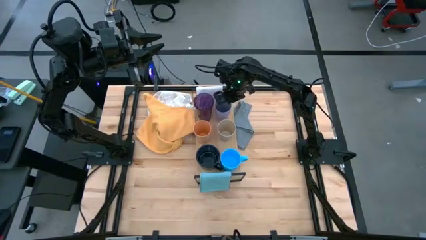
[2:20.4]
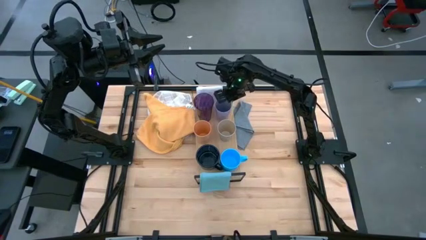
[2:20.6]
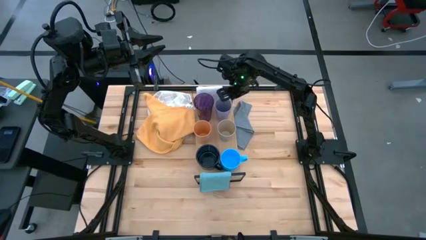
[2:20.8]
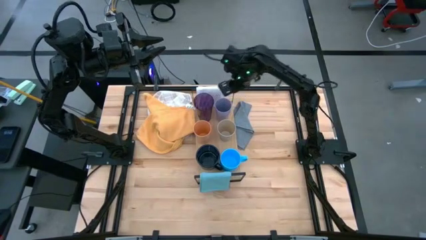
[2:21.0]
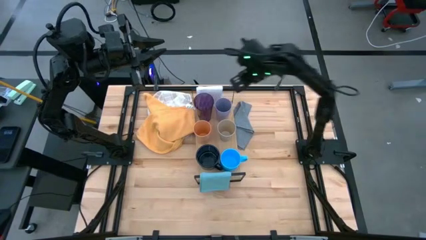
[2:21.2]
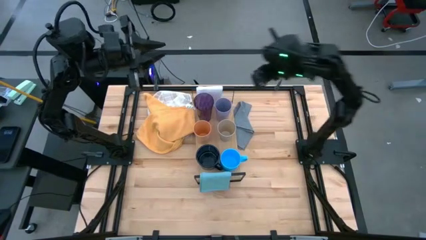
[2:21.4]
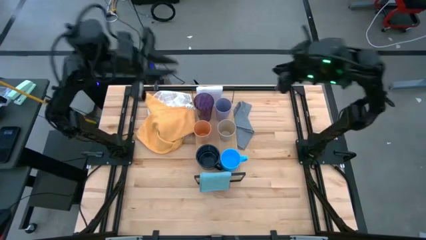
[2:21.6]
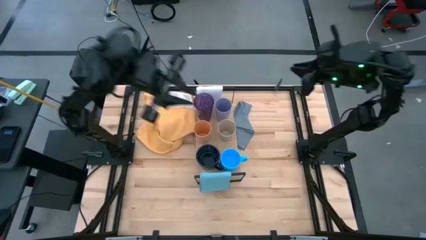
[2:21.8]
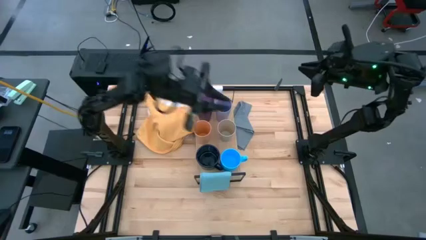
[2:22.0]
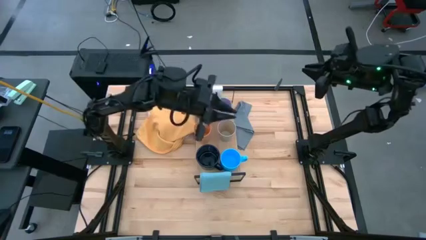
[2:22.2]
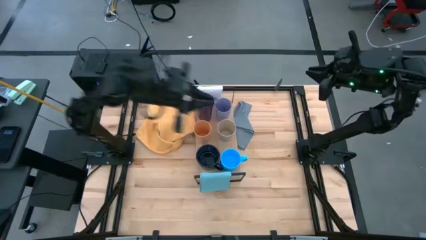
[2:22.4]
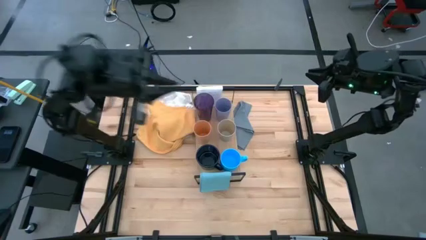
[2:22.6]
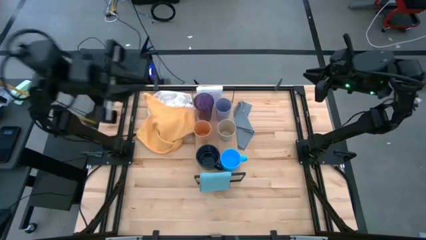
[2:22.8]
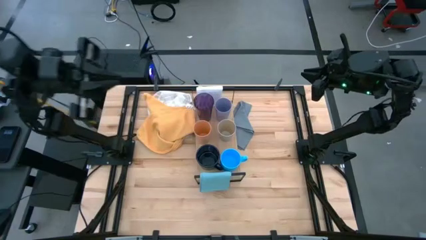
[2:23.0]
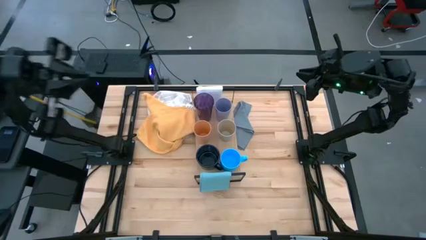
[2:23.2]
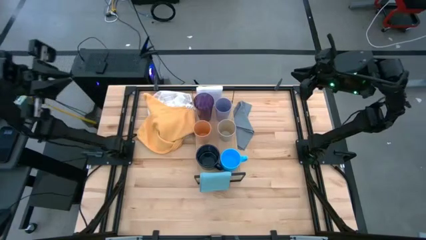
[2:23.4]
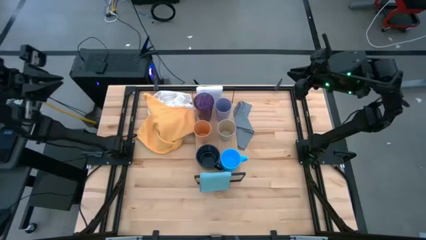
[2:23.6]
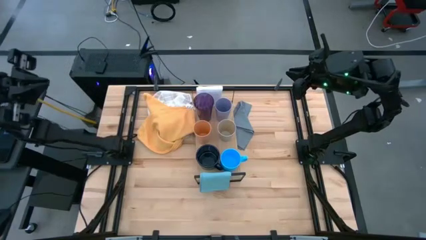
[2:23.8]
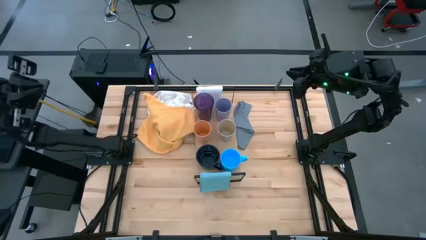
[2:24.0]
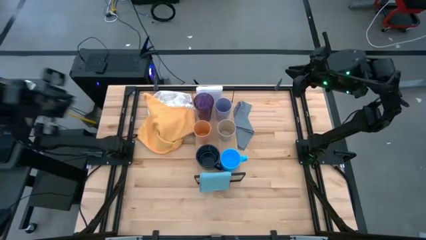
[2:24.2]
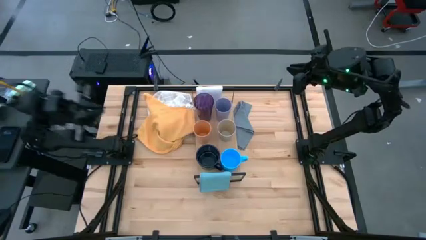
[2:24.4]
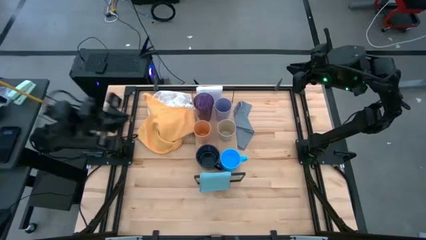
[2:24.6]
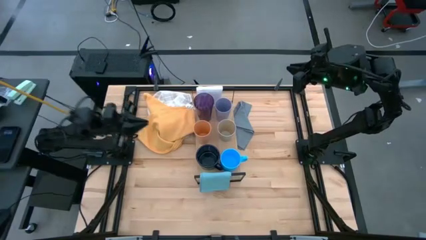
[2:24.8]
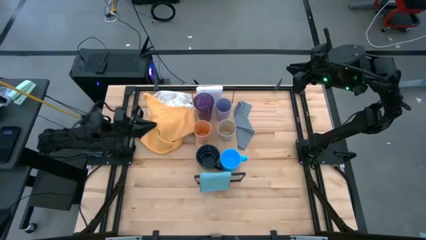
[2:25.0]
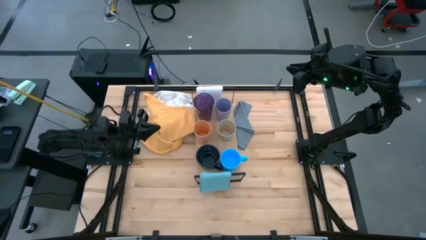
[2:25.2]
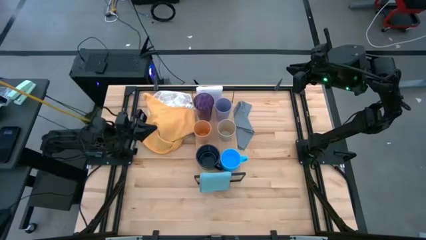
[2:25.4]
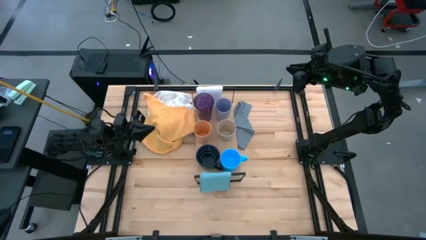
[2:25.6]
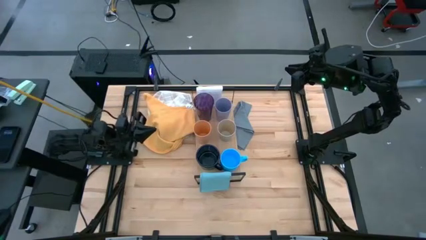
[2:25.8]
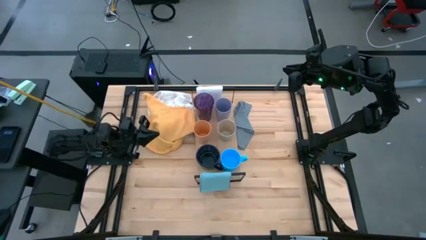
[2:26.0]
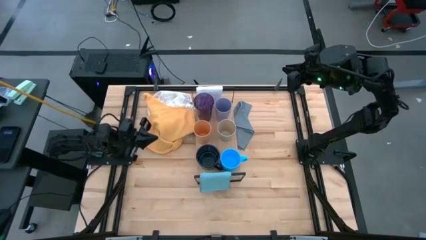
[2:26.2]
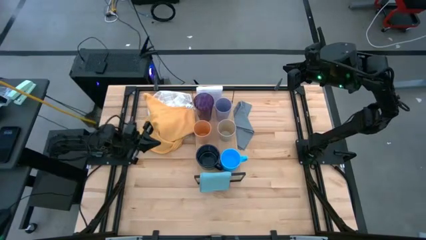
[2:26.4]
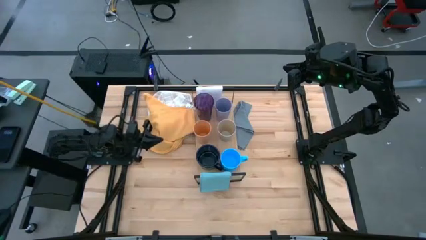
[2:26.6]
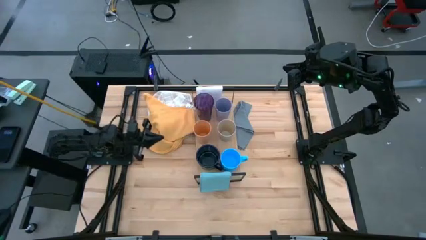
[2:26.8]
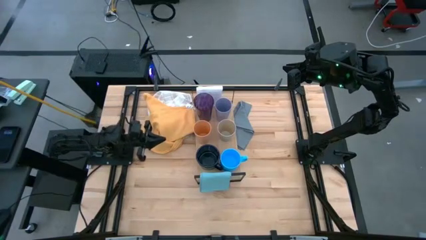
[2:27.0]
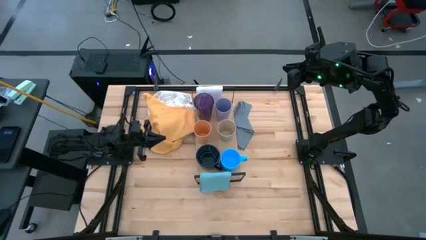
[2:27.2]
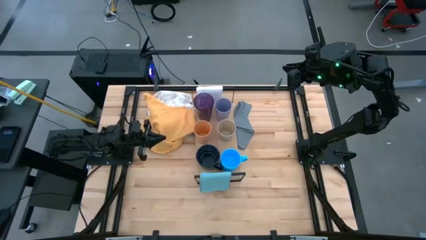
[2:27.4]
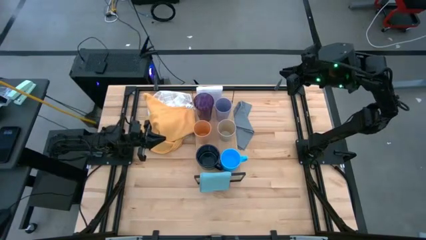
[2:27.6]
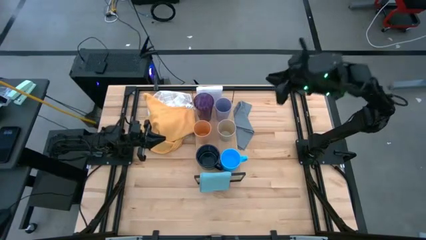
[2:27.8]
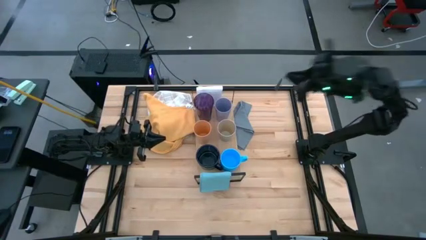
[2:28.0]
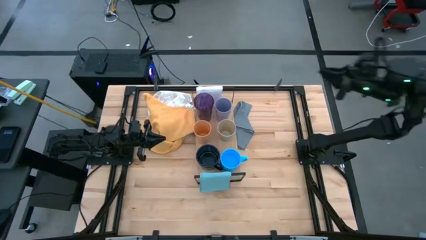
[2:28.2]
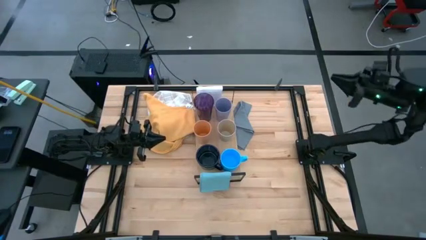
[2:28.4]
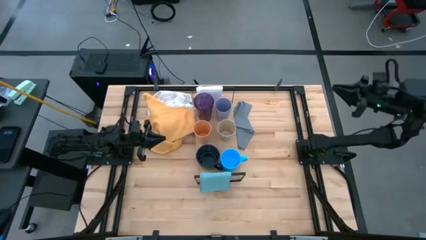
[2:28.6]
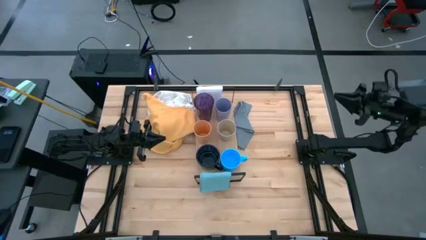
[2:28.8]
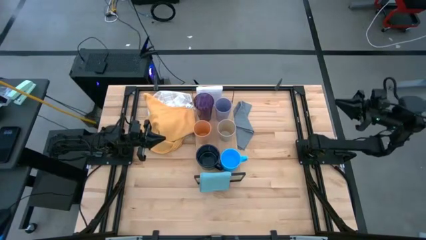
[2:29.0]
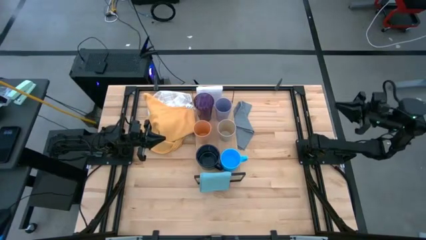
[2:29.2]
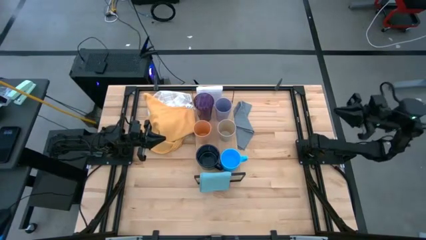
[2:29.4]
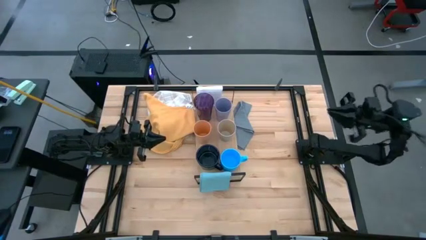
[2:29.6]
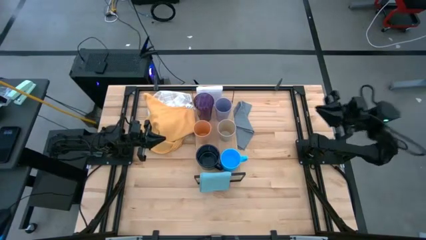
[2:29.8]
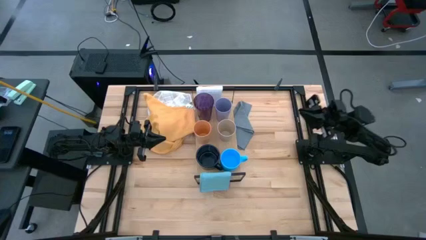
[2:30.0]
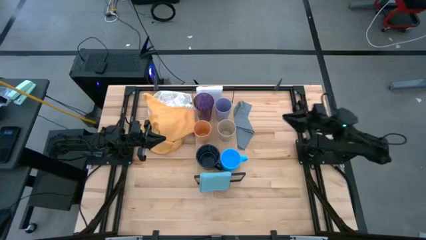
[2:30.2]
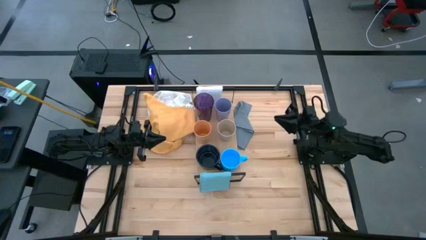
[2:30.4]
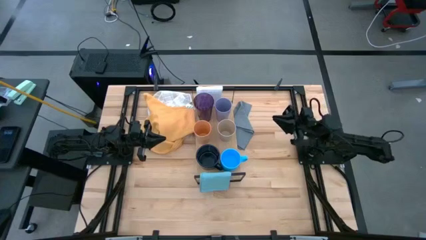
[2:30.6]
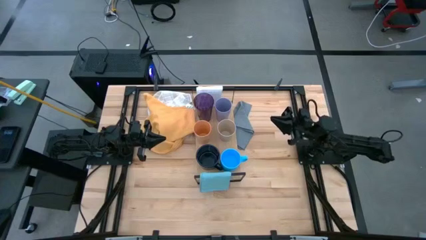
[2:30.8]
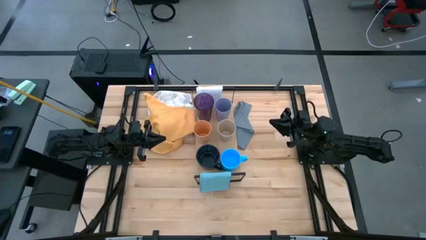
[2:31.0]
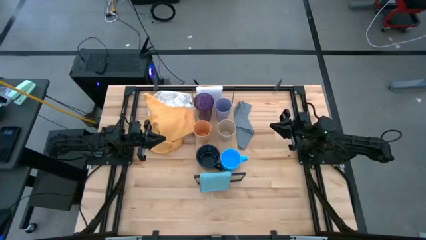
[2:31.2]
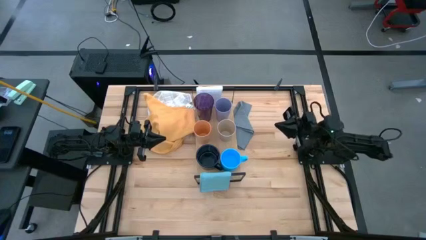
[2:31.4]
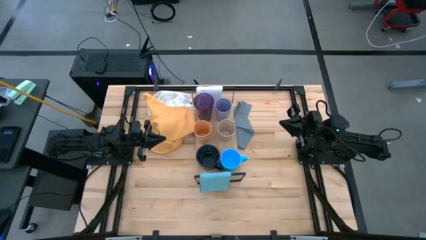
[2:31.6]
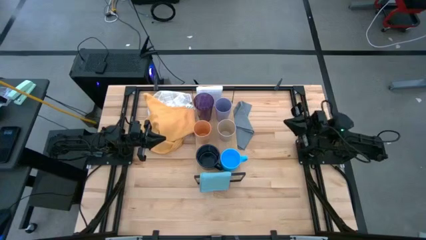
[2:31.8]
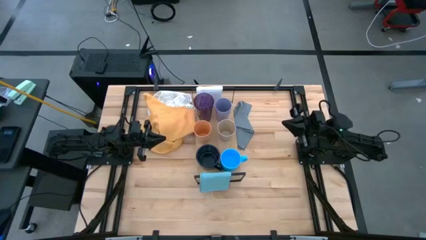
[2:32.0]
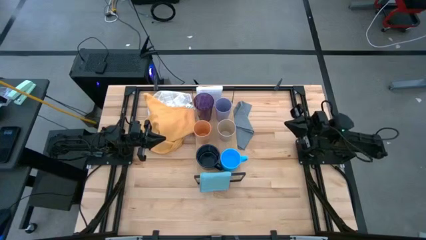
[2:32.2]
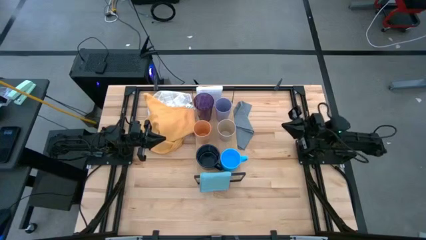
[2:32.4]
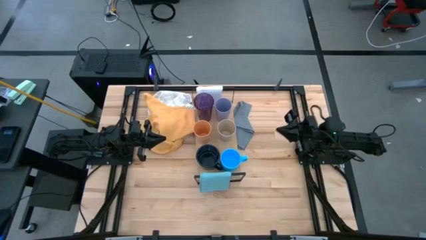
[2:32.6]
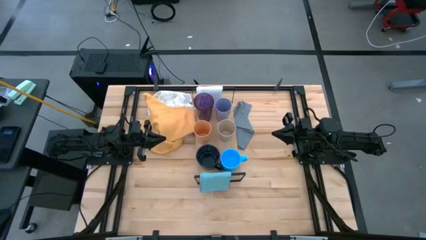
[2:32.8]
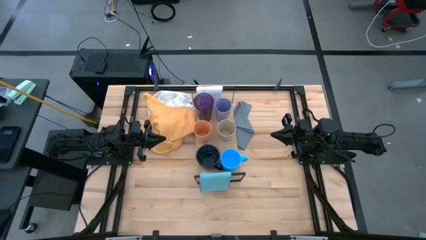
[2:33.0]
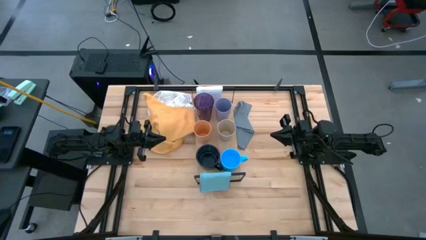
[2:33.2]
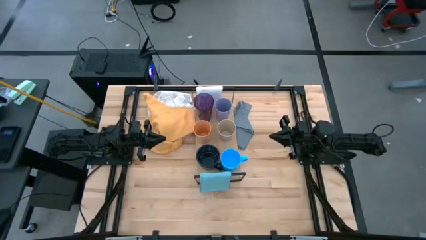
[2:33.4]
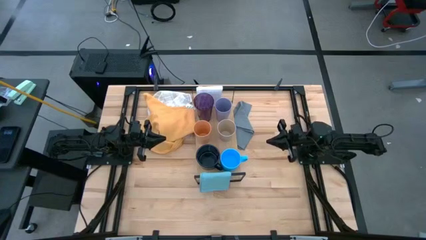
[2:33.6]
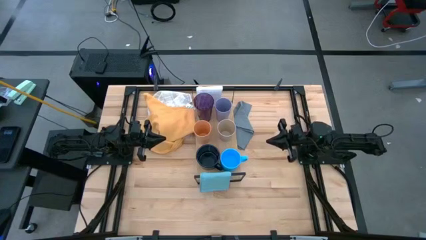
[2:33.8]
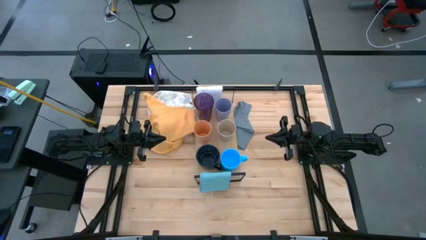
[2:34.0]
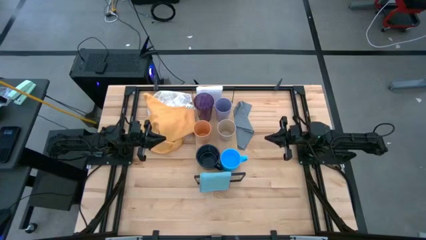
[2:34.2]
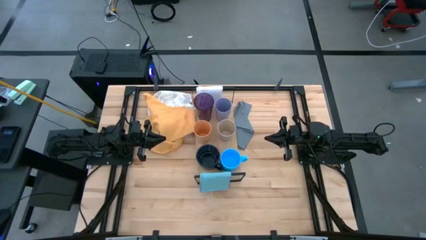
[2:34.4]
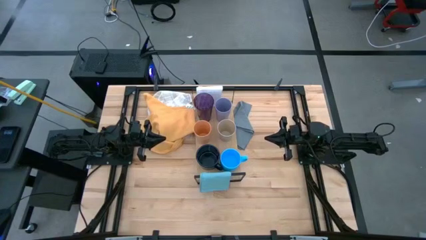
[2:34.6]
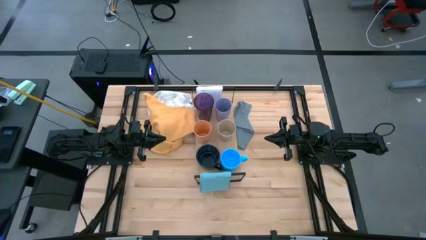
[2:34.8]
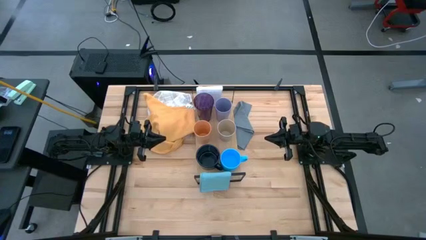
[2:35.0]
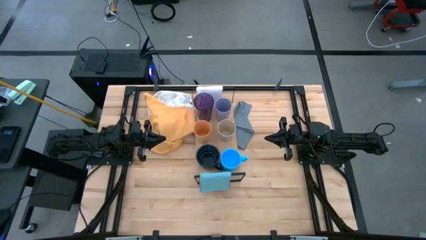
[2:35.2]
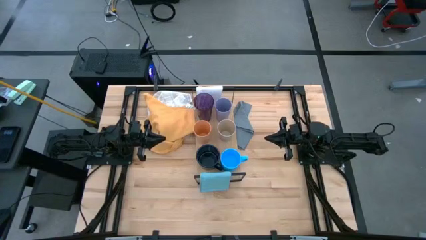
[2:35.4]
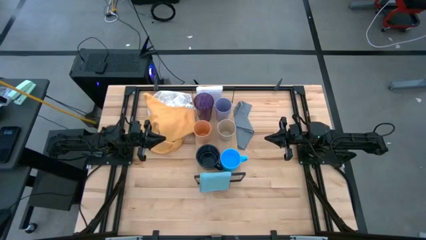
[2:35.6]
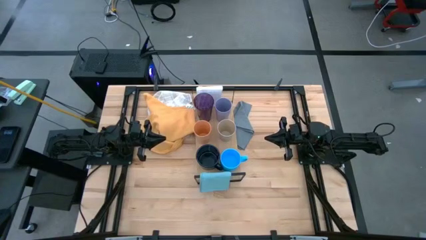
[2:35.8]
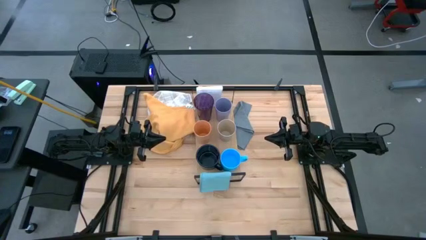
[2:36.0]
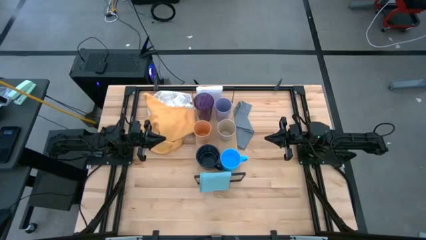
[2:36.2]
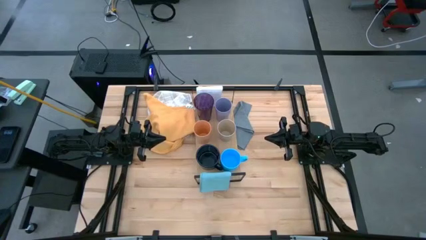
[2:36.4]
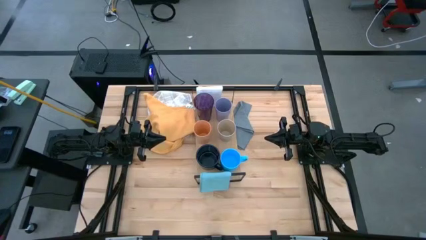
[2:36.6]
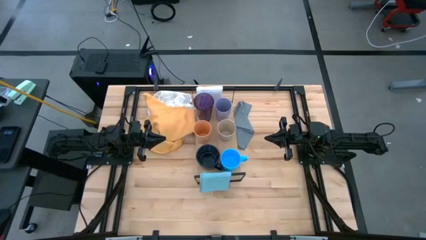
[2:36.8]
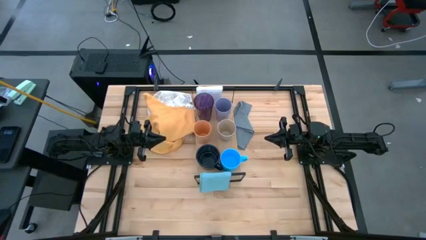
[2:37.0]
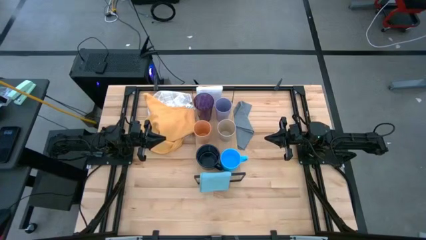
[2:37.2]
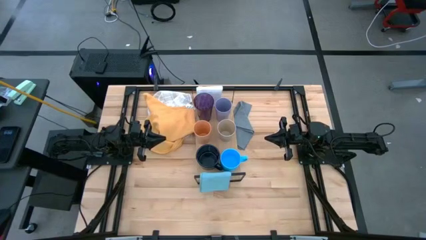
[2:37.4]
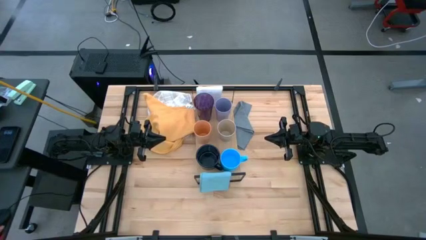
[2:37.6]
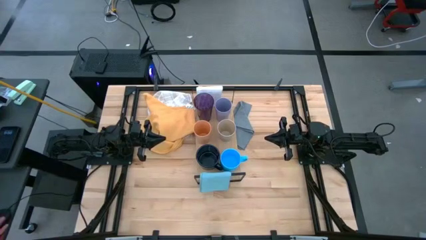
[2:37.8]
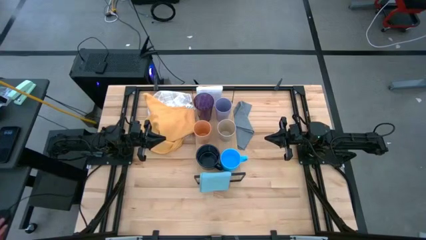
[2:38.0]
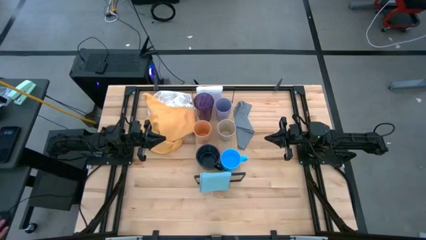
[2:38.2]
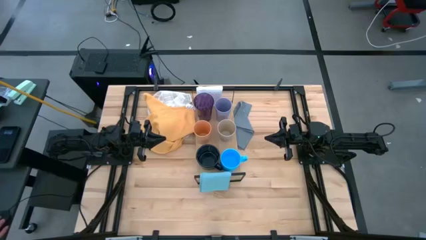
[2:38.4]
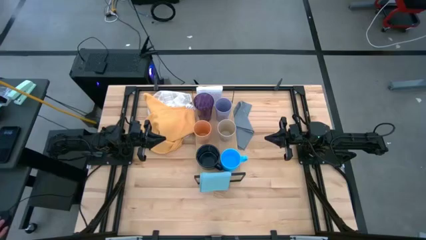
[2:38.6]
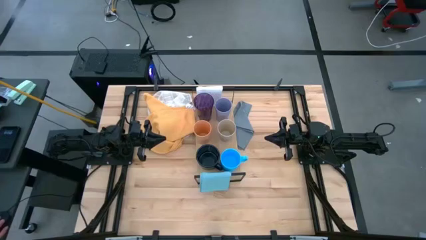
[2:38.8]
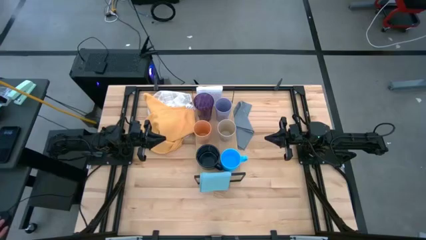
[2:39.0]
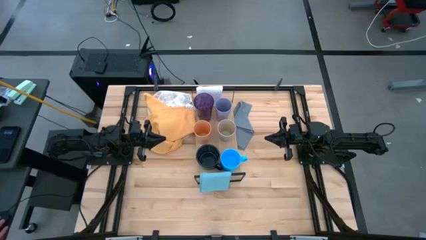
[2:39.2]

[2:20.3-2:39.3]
Task: Stack small to large cups/mugs on shelf
Return to Home Position
